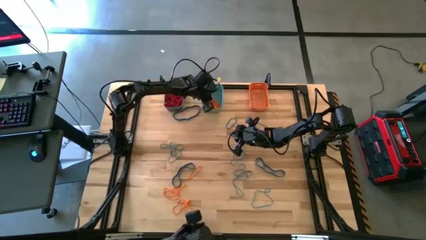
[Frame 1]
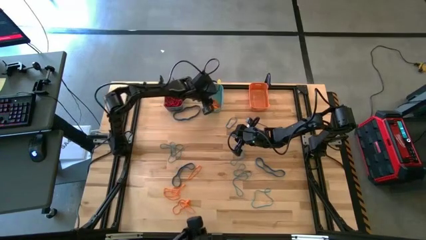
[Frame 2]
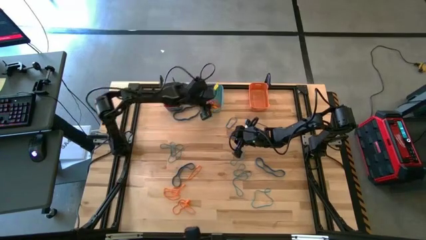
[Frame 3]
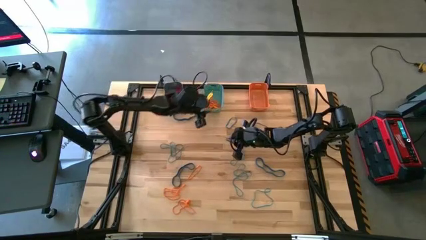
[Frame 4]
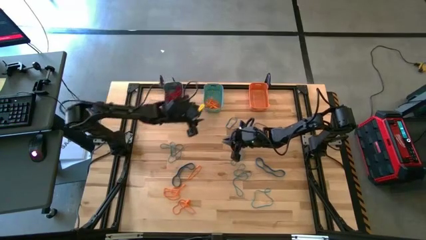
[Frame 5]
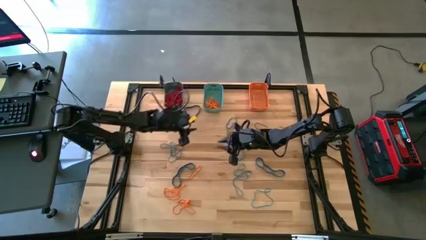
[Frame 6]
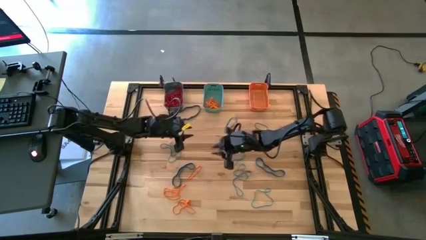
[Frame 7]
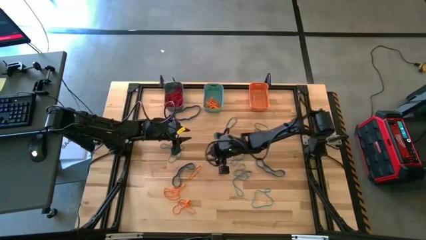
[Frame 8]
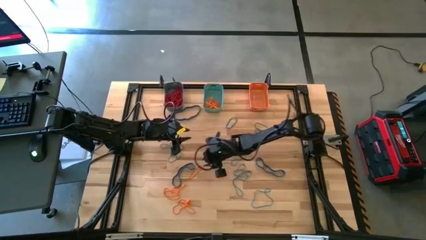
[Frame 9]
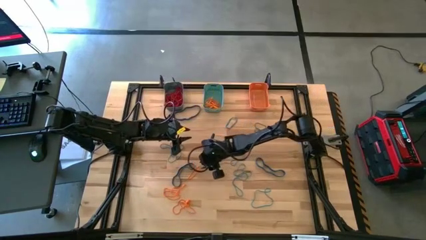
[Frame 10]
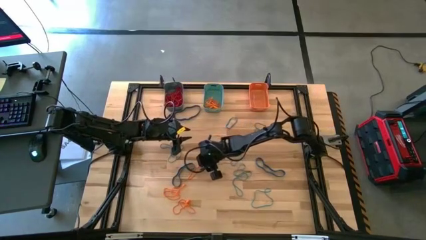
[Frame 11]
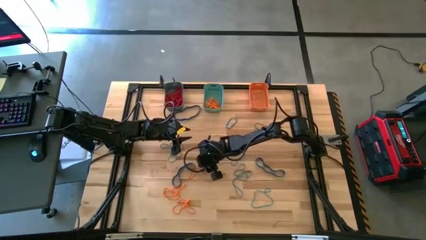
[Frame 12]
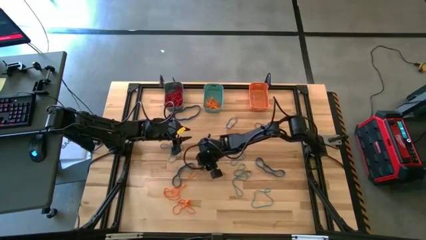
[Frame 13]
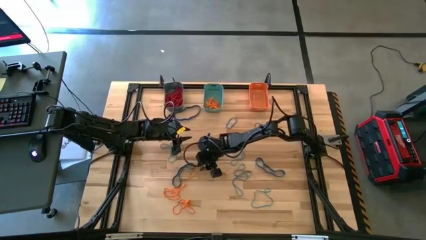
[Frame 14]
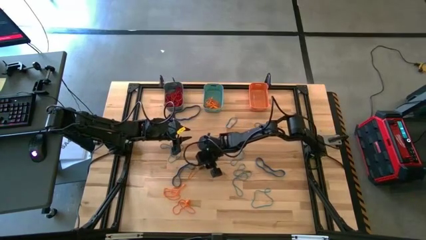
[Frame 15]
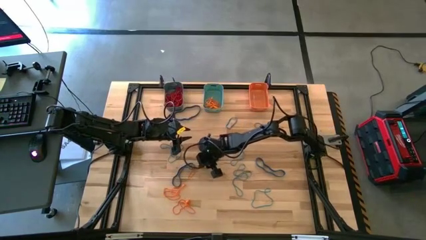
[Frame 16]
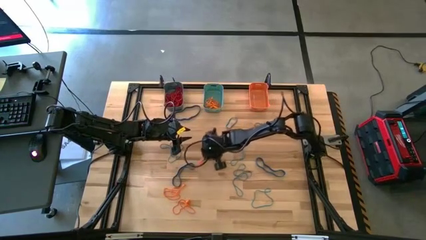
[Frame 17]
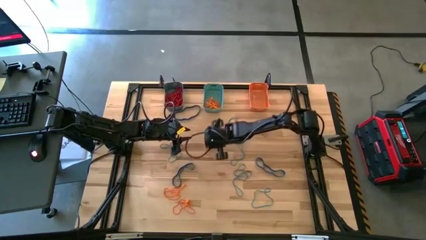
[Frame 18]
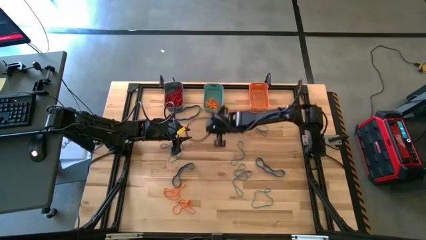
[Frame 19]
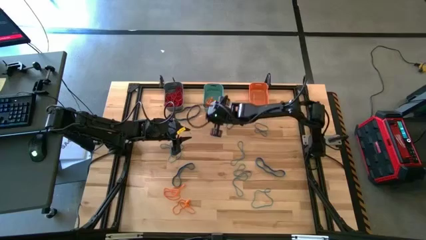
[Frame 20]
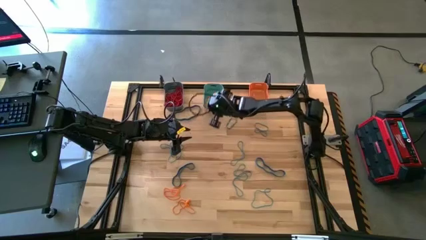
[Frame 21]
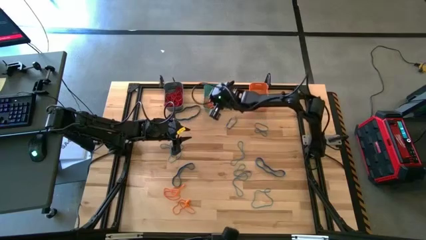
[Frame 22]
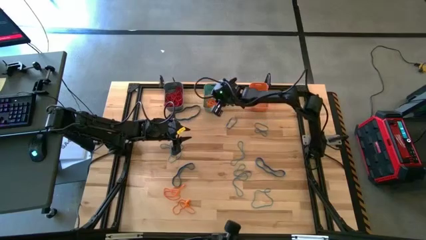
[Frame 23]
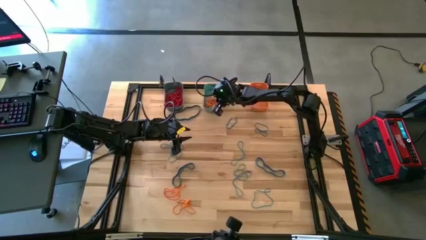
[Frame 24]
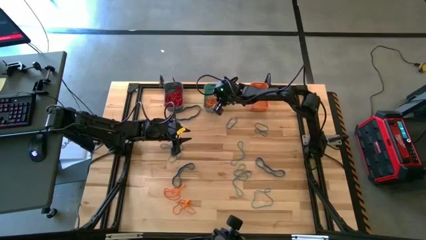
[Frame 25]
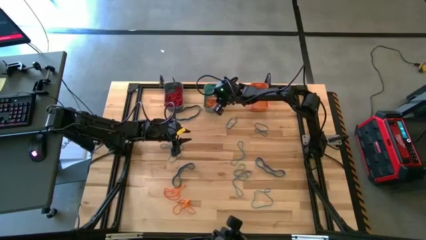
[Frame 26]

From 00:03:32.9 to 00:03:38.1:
Task: Sort rubber bands into baskets
Put the orange rubber band into the green bin

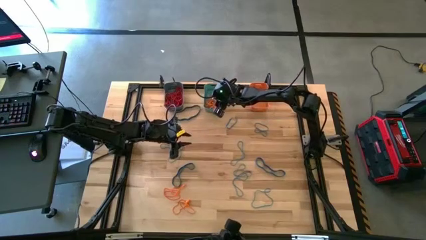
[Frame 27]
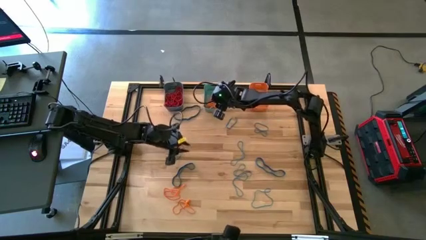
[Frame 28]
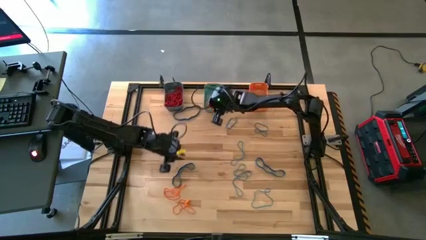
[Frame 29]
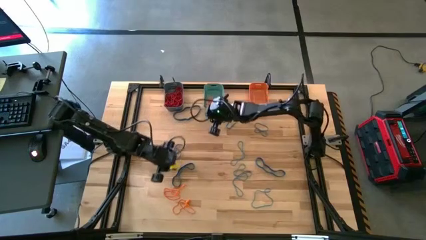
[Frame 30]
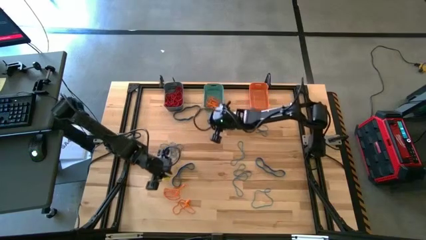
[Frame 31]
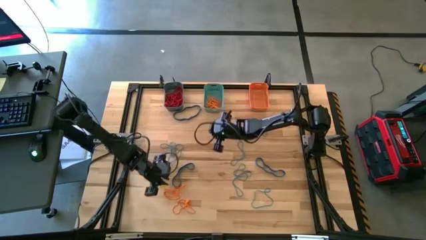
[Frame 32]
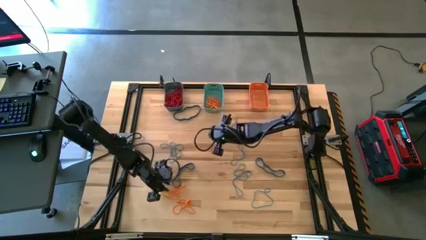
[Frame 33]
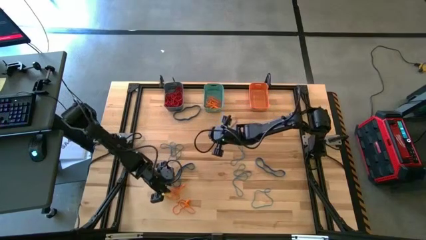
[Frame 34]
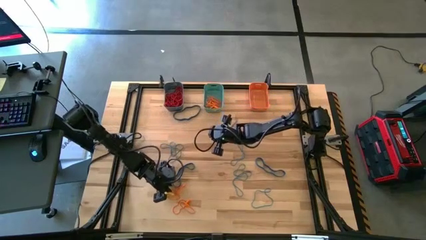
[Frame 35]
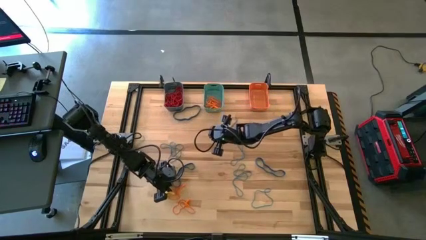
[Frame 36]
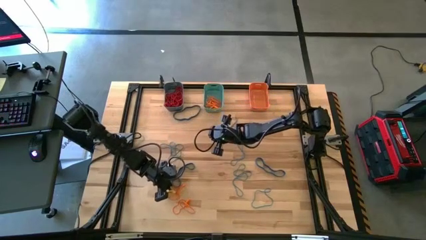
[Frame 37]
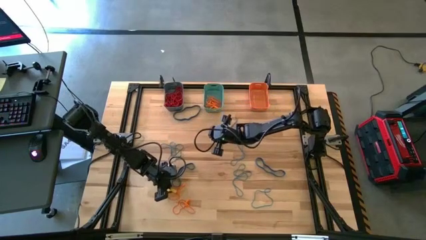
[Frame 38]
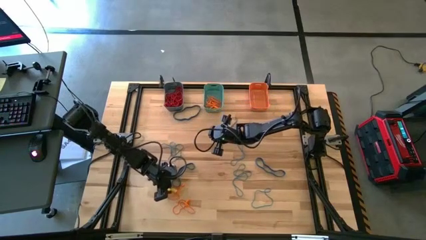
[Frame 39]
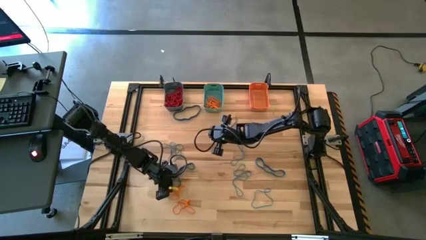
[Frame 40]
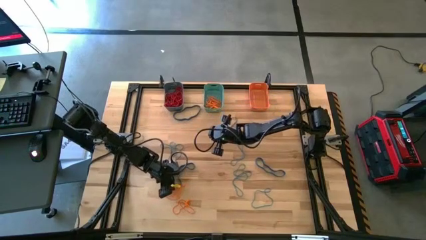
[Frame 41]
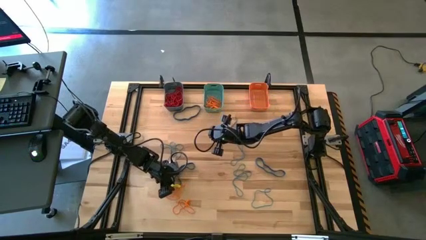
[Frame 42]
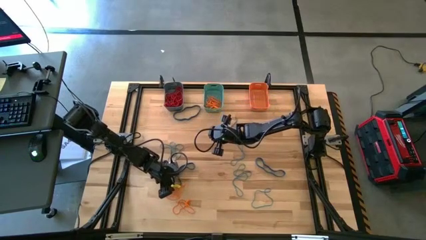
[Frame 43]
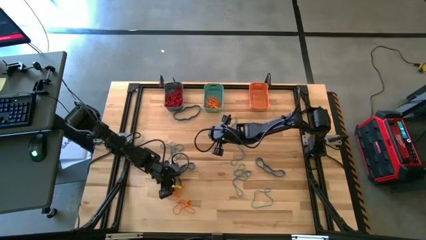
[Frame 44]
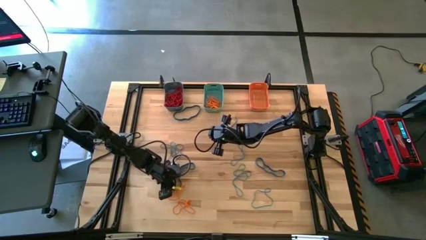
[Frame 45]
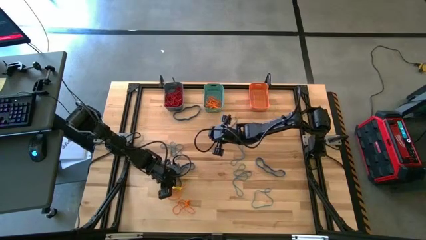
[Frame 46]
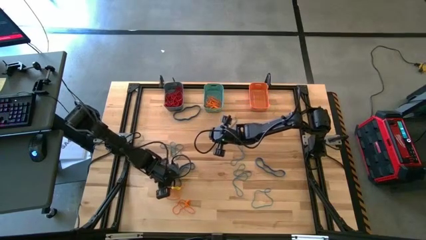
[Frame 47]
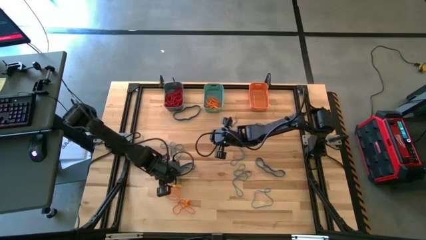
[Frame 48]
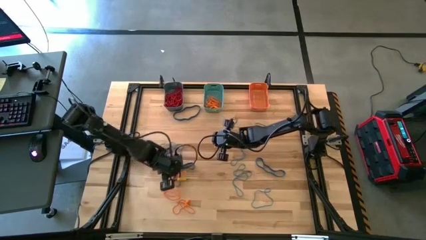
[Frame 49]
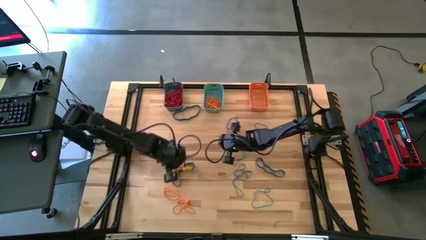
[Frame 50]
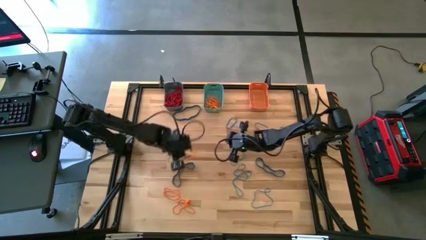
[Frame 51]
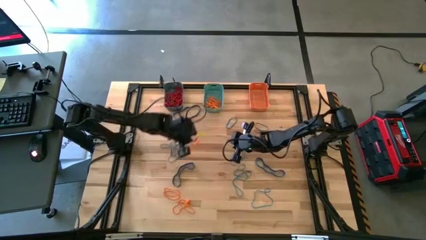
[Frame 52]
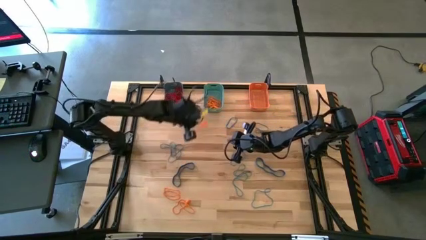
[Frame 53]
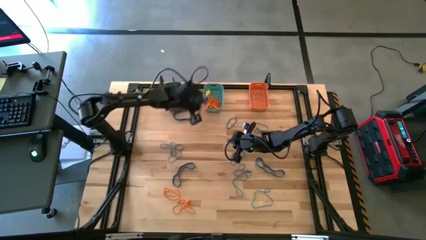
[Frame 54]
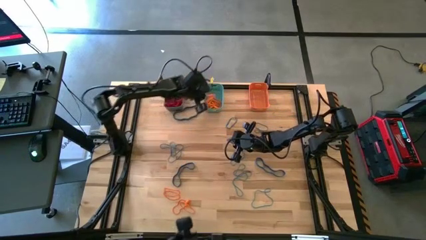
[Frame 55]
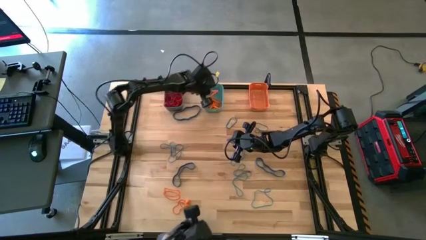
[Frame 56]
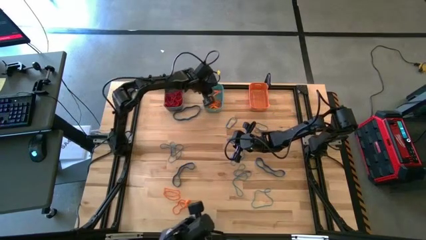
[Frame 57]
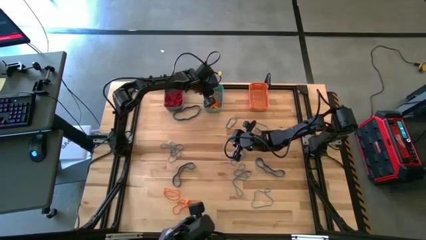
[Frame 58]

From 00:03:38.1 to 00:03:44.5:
Put the orange rubber band into the green bin

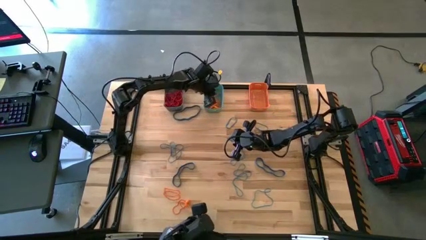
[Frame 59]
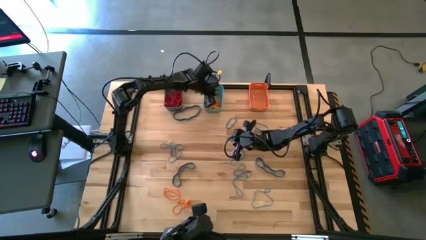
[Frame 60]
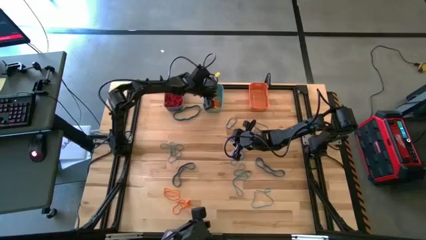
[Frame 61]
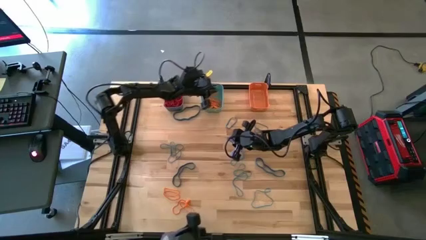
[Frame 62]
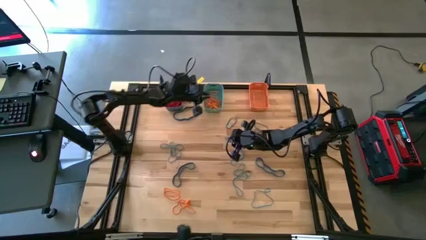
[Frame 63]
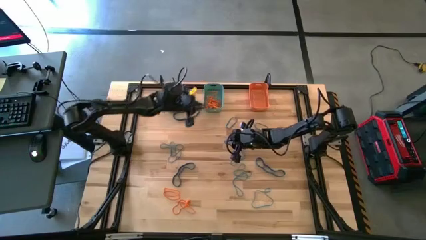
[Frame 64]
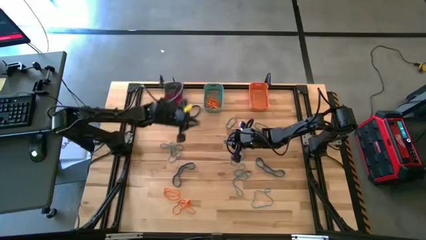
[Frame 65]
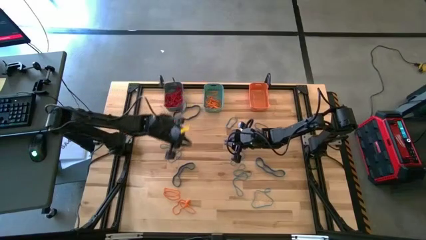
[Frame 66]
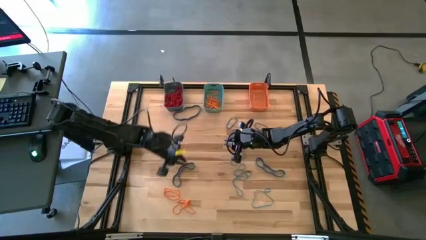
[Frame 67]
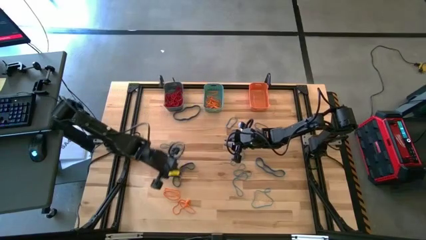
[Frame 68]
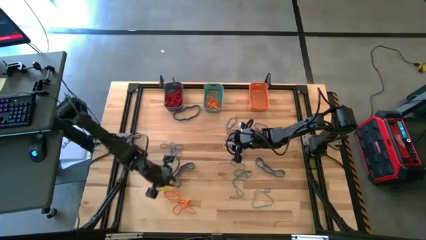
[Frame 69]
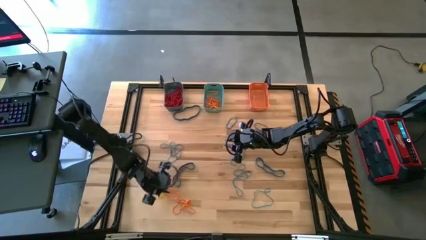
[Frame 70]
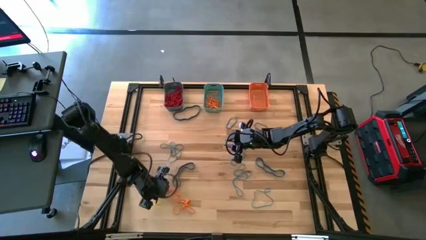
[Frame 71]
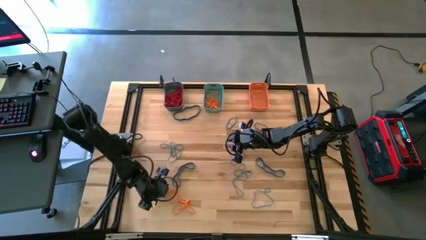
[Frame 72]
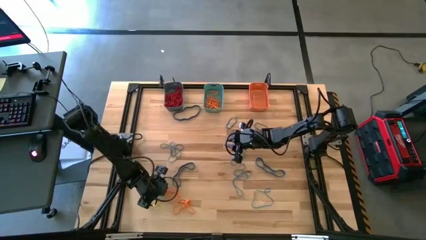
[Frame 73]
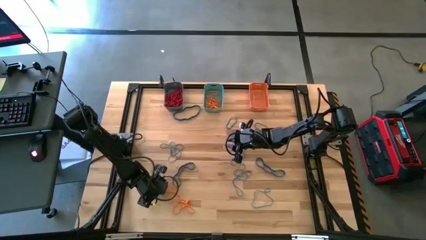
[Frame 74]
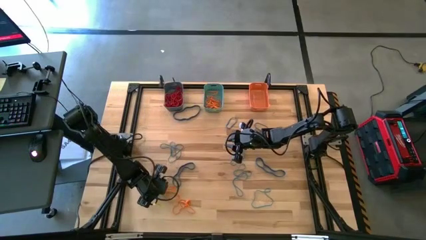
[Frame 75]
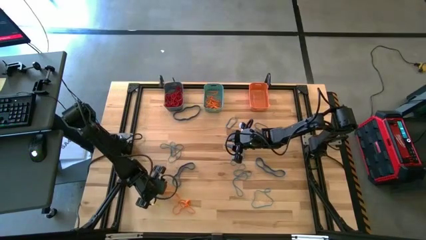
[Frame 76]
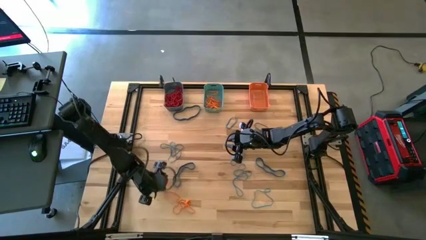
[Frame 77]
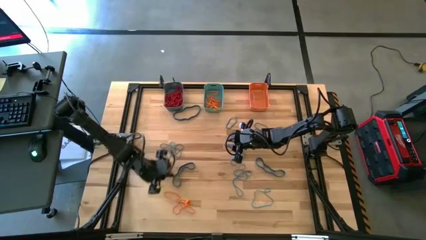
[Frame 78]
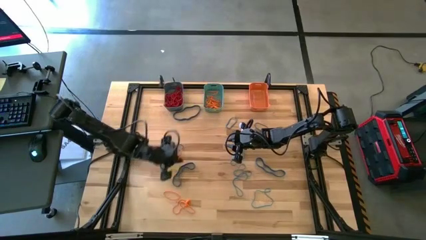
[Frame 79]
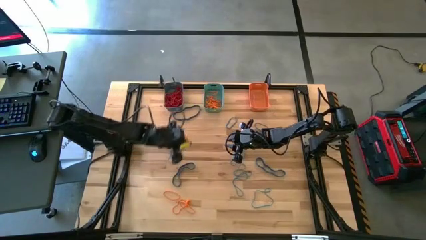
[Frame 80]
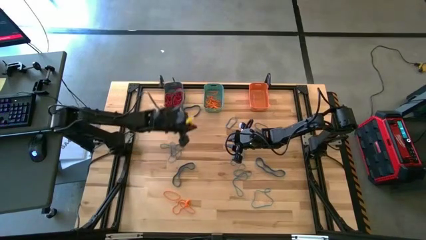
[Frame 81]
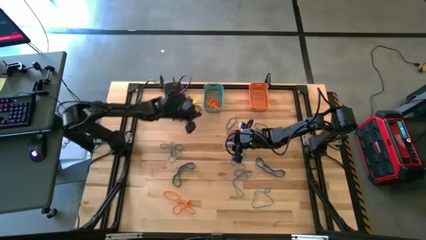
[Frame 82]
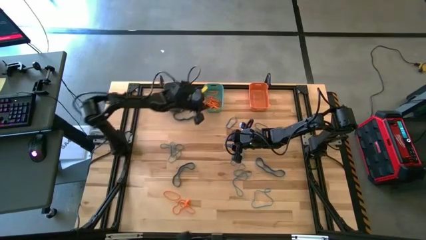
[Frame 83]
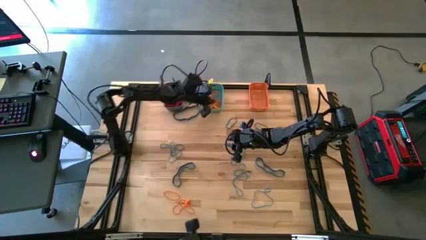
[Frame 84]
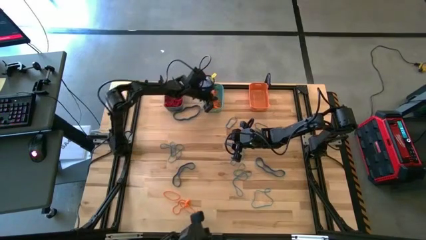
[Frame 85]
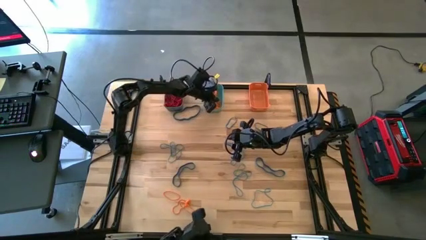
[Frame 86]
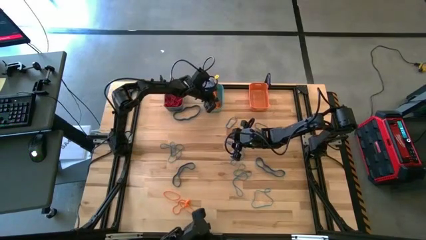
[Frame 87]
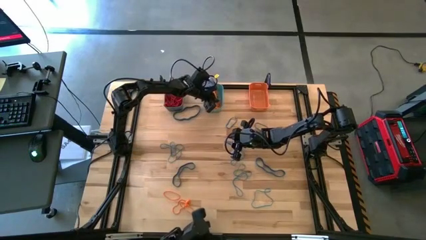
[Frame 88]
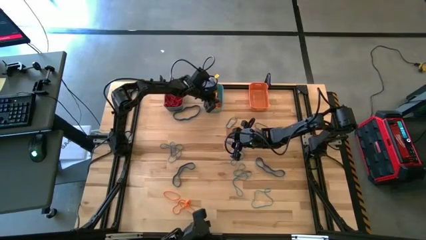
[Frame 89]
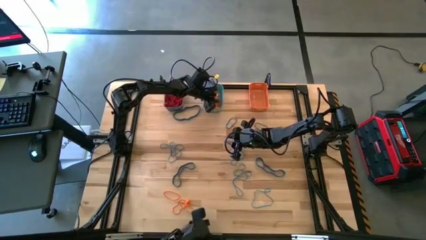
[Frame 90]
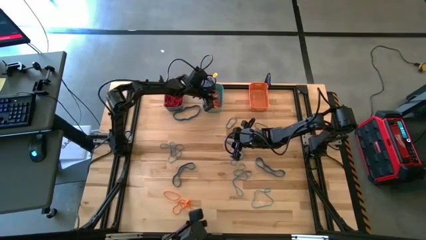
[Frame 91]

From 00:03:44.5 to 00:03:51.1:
Put the orange rubber band into the green bin
